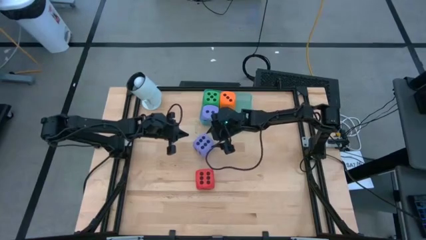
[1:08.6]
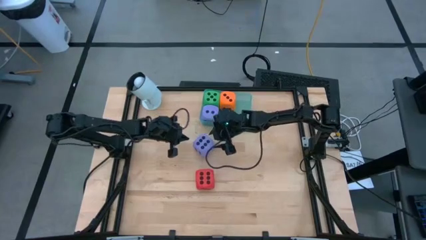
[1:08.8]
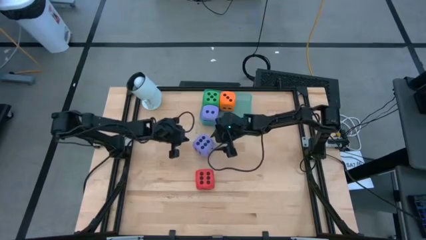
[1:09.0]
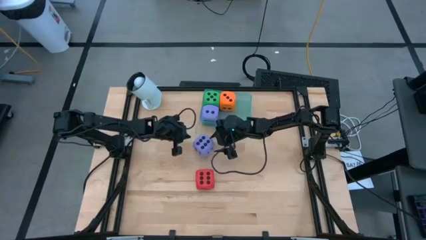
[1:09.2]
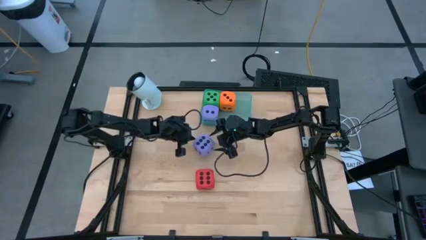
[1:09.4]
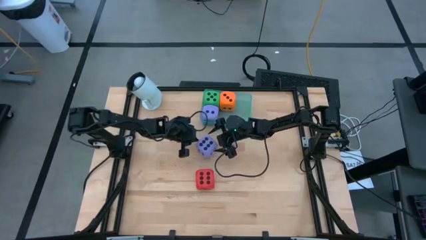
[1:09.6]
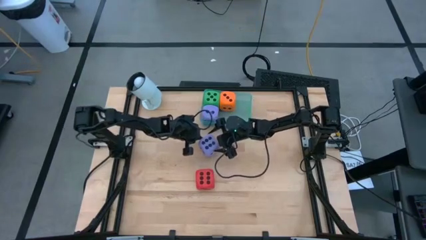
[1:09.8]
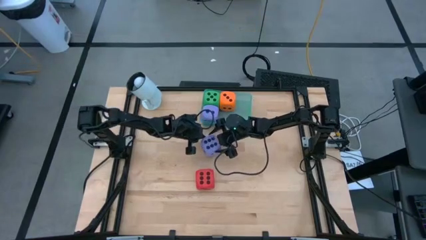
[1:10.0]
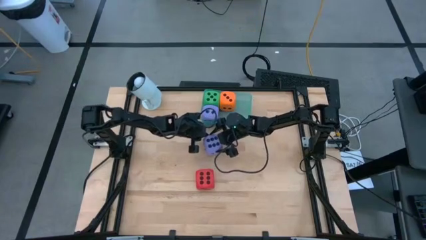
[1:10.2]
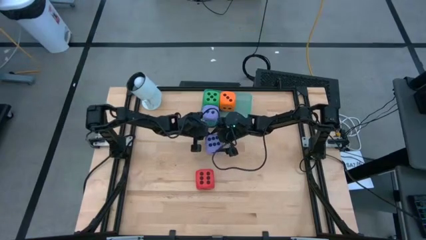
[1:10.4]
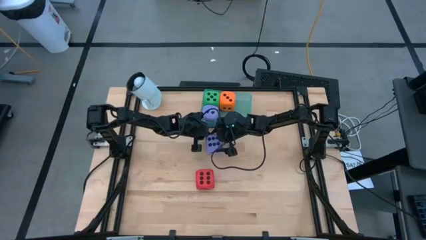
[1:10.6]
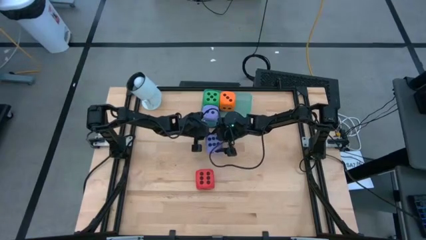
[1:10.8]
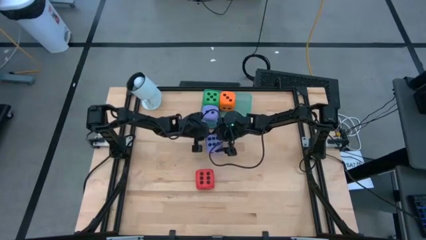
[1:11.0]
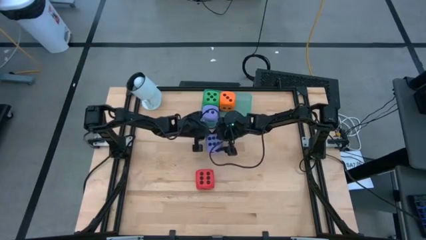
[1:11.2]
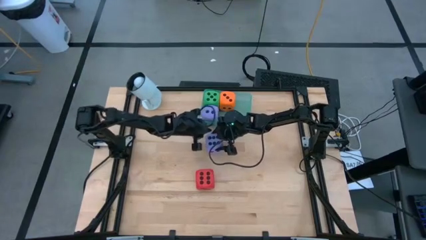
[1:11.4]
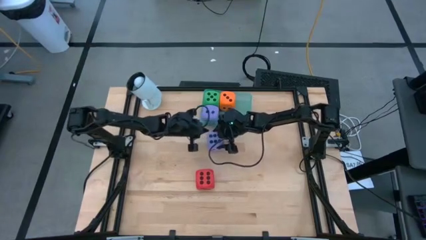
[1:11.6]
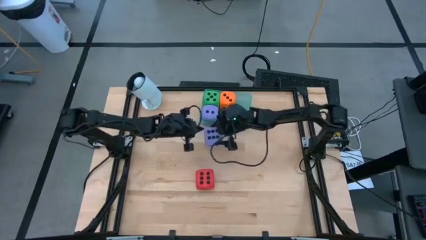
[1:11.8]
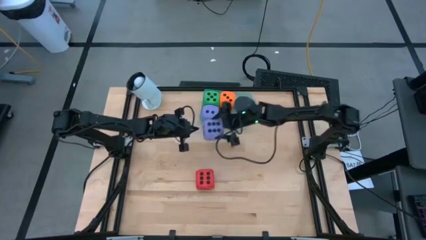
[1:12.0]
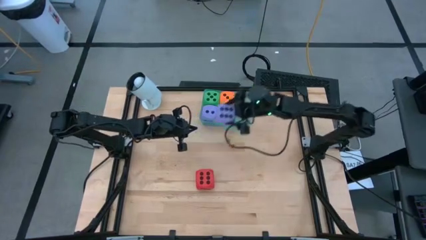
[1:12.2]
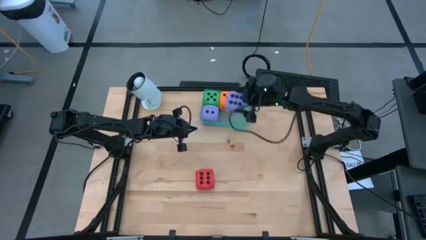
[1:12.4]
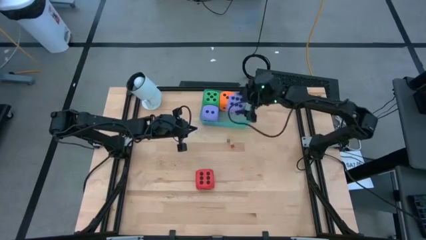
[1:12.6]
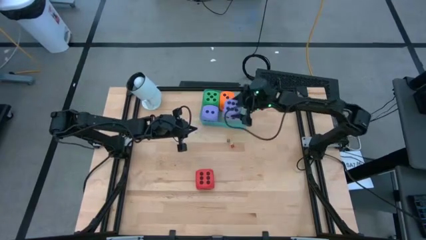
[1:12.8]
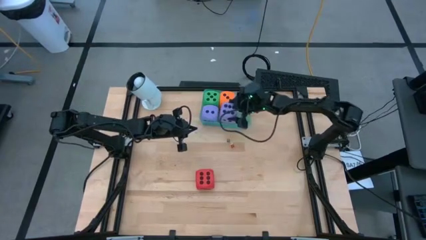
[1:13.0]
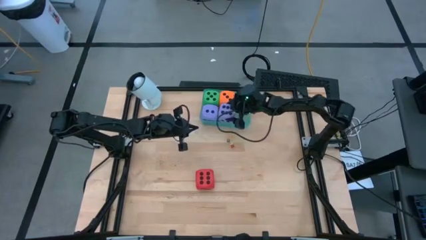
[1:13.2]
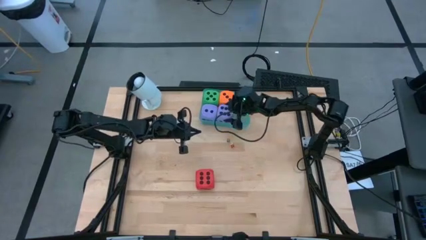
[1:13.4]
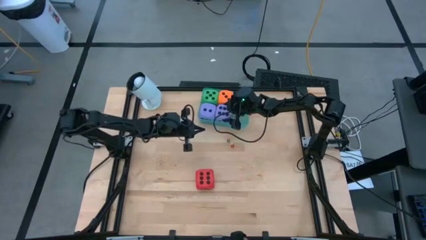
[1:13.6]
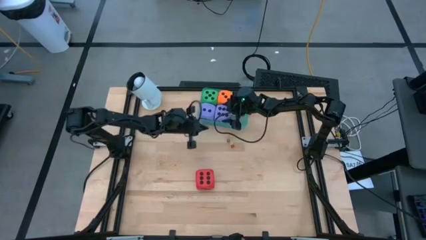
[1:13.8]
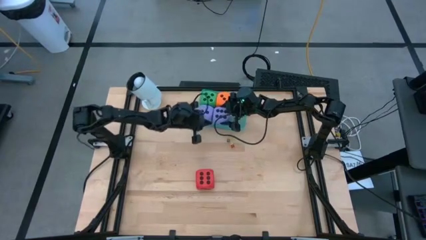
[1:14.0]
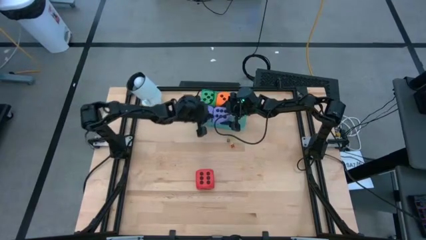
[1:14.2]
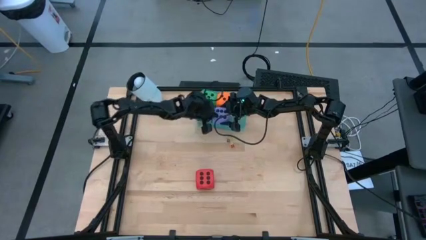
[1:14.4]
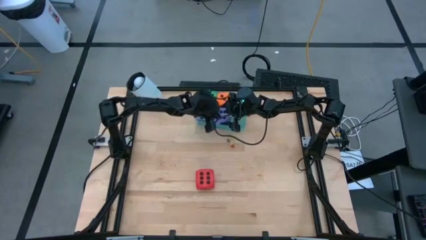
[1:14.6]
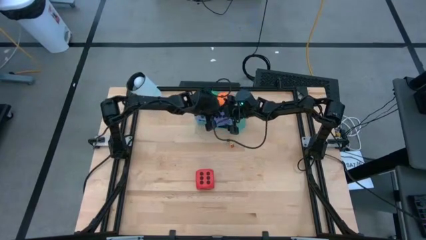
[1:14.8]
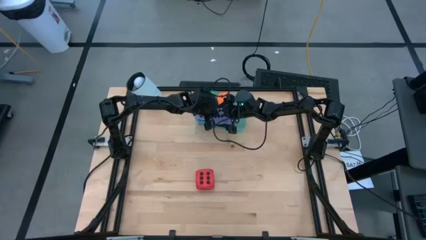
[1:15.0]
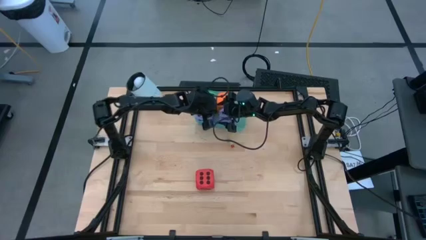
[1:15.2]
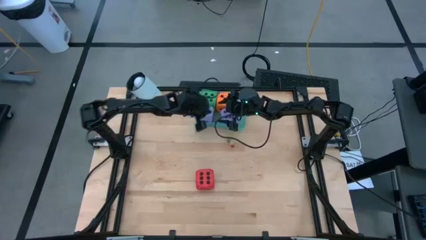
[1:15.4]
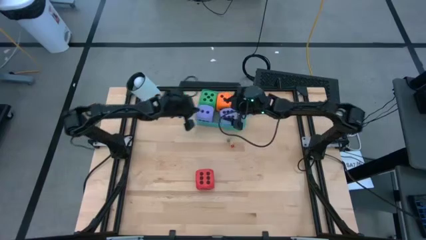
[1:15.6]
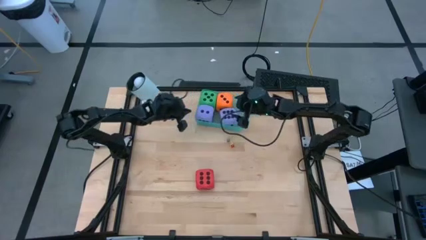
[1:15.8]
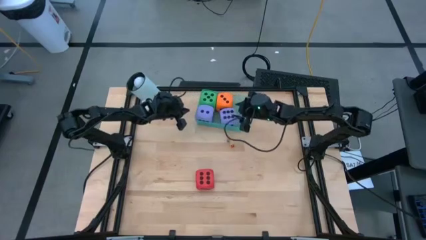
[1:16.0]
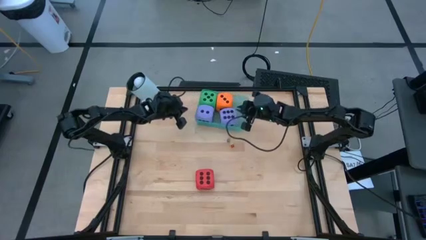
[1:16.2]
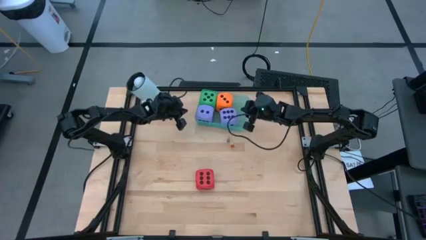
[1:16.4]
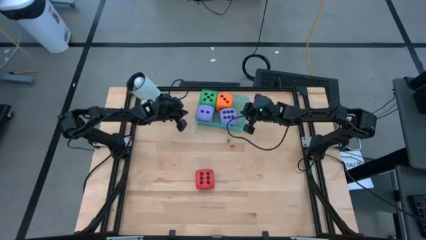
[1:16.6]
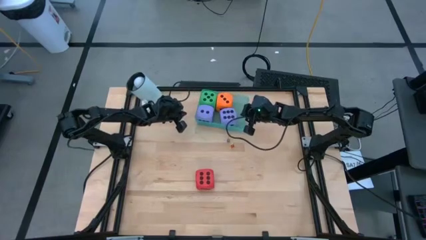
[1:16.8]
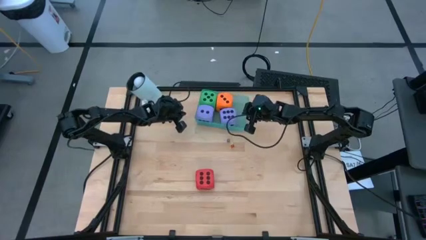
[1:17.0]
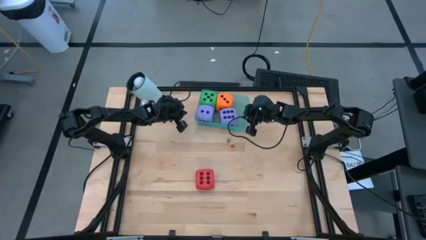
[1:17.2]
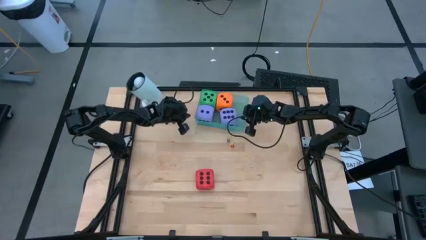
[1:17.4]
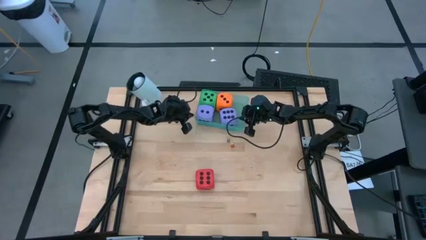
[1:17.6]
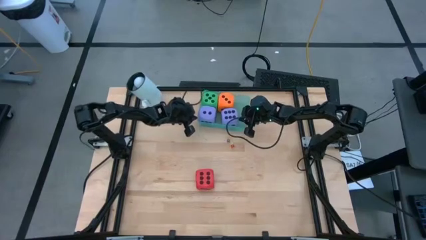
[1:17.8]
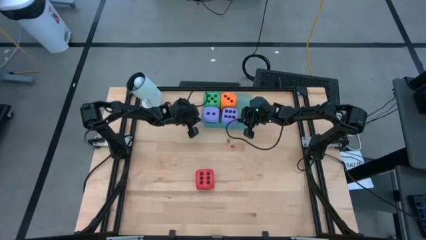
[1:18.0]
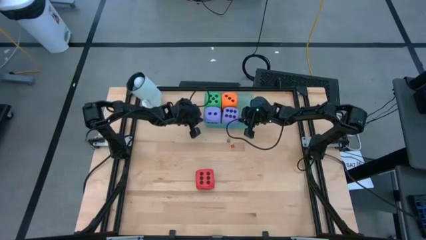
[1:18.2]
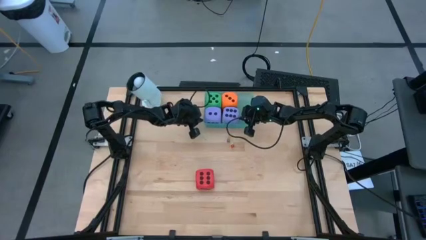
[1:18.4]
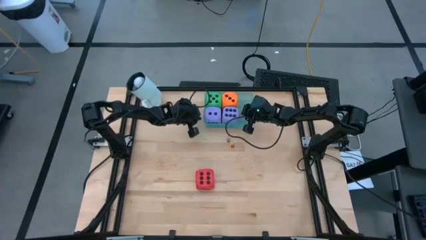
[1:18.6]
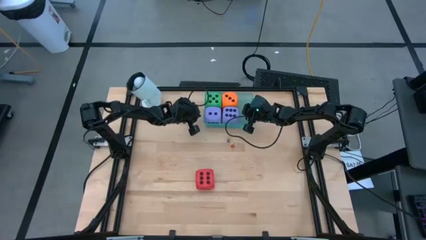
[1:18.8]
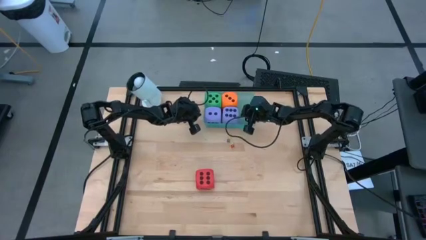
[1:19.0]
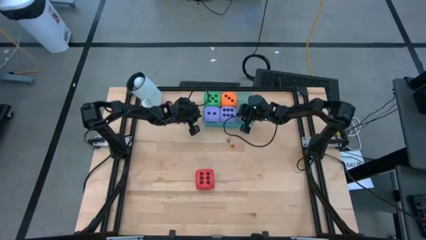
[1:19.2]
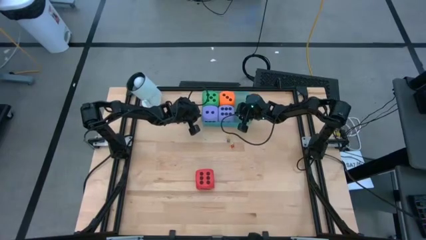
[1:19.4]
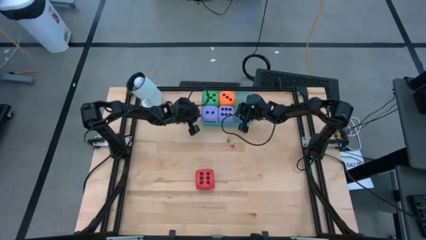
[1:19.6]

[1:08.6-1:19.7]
Task: Pick & Place Dice
Put the large purple dice into the green container
